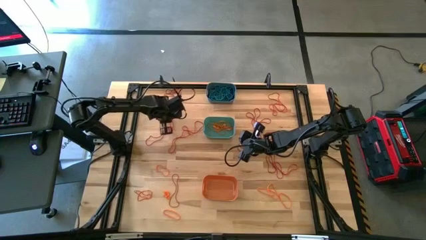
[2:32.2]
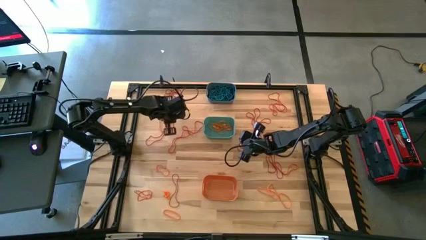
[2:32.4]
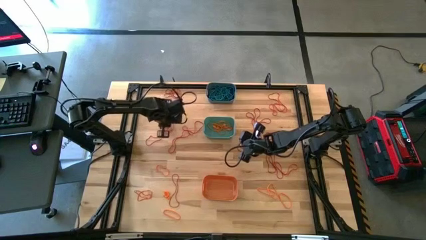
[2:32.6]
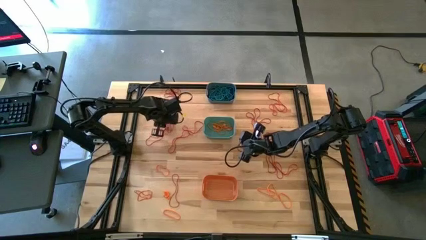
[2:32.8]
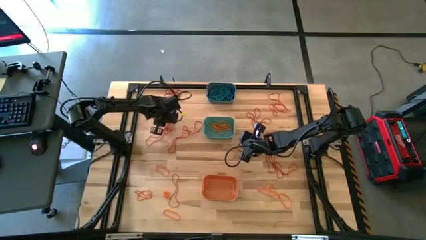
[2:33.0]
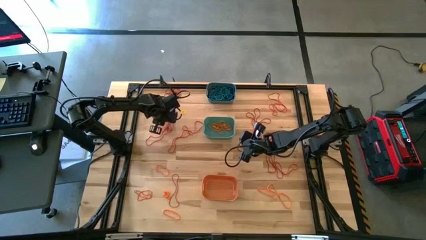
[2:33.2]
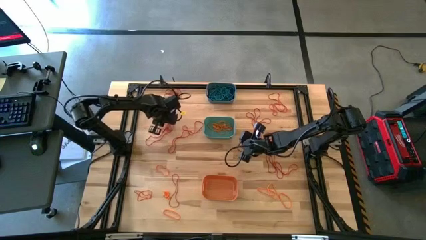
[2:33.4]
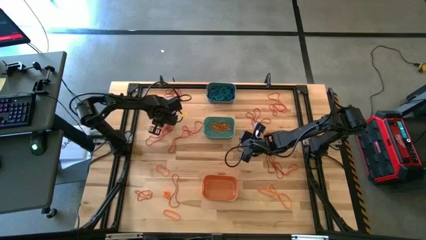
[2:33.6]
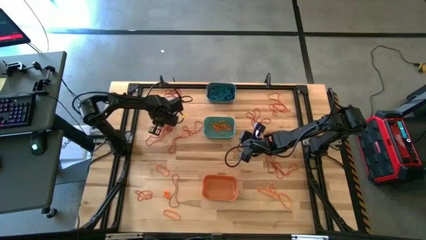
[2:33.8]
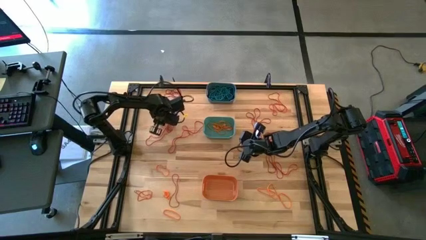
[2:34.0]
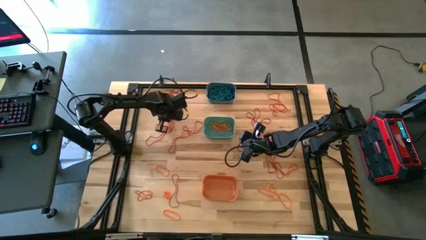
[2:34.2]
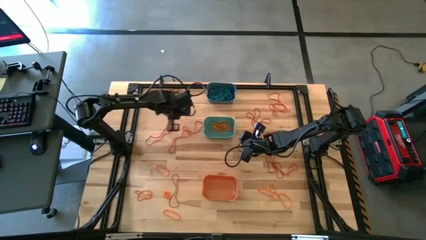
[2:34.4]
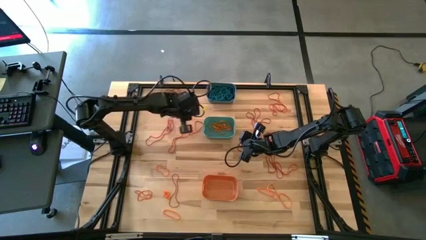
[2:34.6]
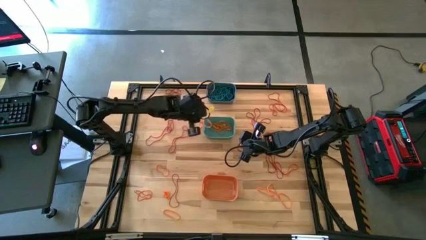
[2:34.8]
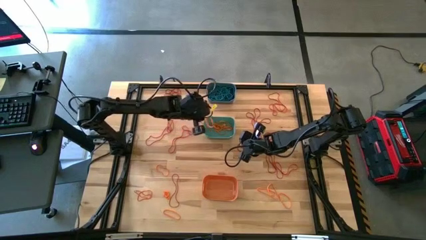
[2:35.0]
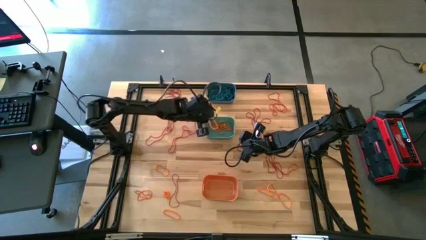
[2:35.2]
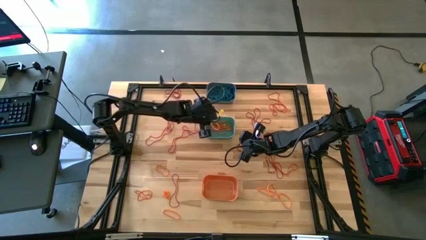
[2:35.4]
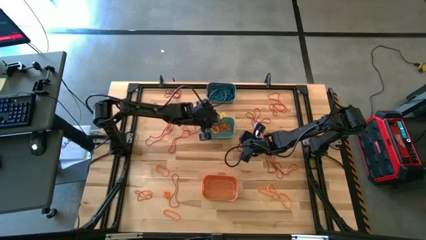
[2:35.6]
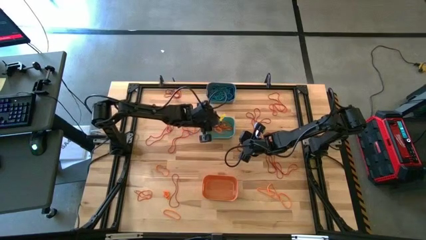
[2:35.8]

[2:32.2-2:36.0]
Task: Sort rubber bands into baskets
Put the orange rubber band into the green bin

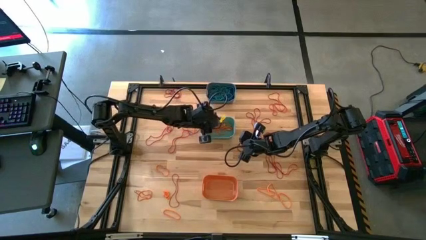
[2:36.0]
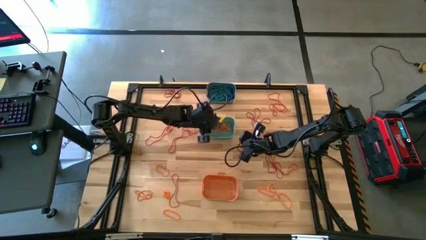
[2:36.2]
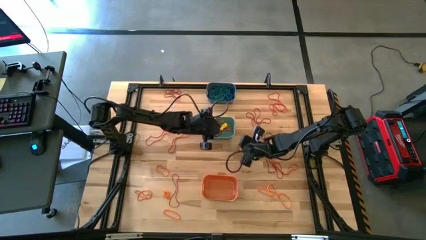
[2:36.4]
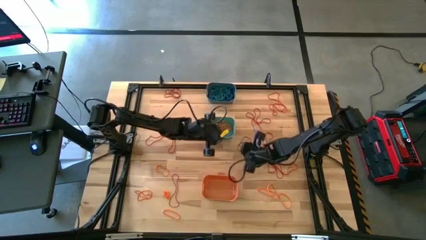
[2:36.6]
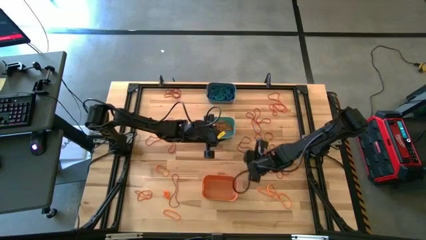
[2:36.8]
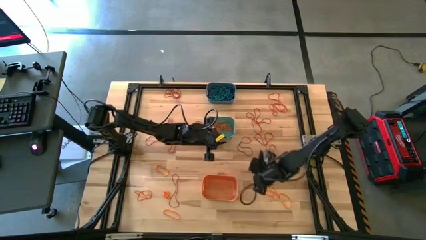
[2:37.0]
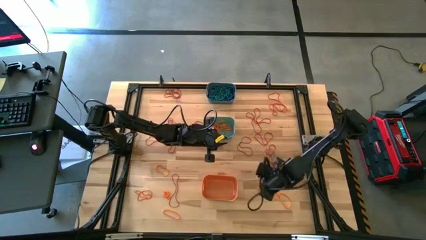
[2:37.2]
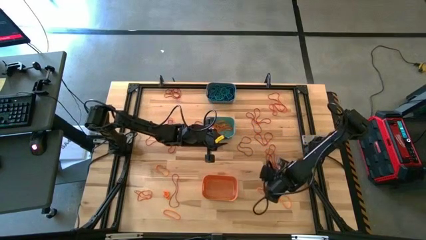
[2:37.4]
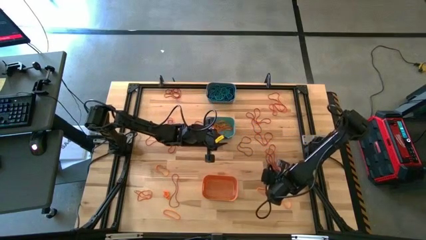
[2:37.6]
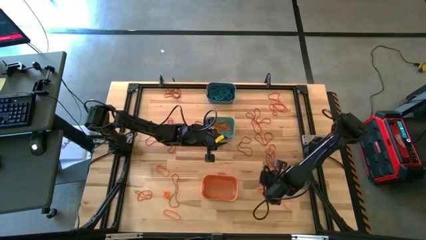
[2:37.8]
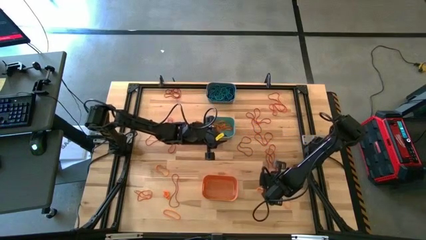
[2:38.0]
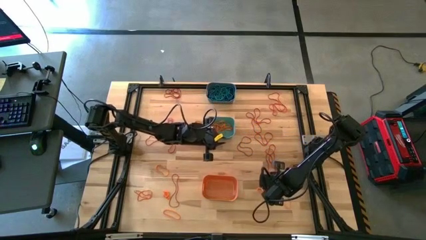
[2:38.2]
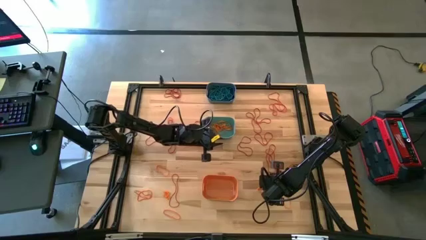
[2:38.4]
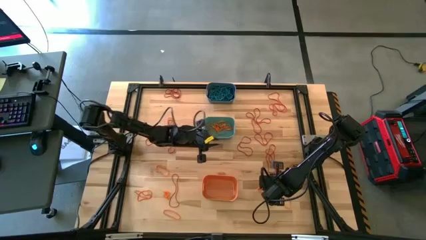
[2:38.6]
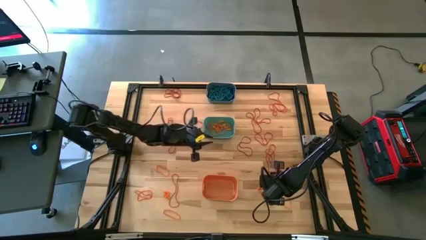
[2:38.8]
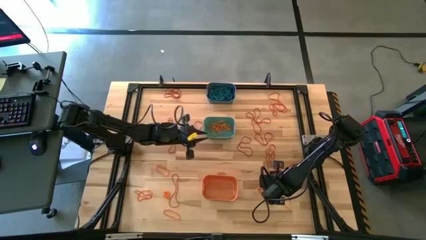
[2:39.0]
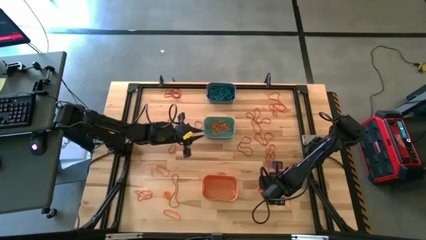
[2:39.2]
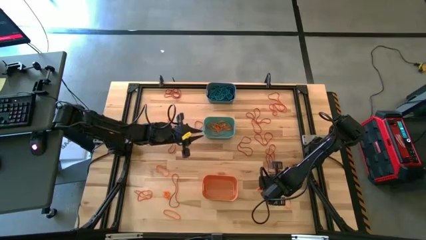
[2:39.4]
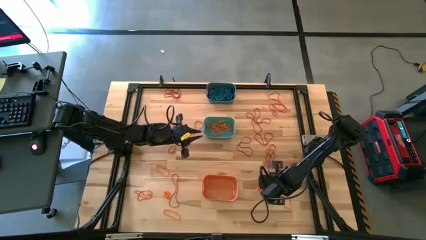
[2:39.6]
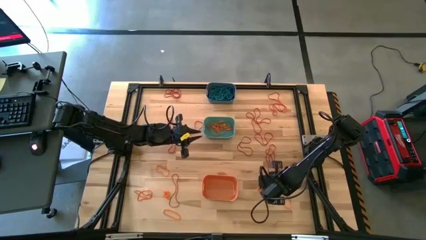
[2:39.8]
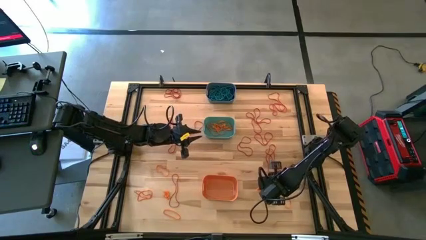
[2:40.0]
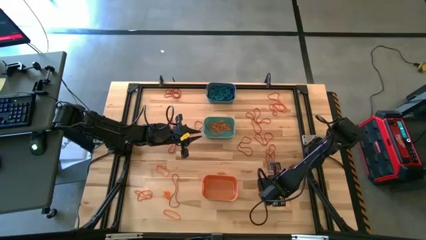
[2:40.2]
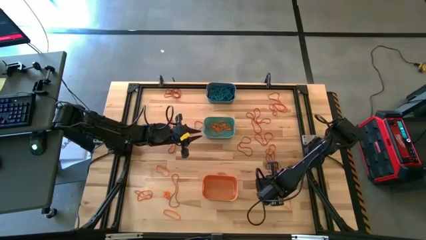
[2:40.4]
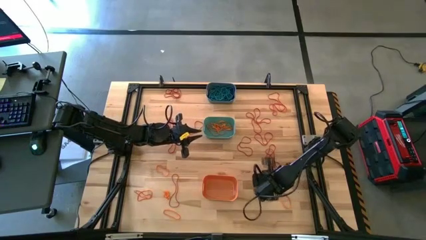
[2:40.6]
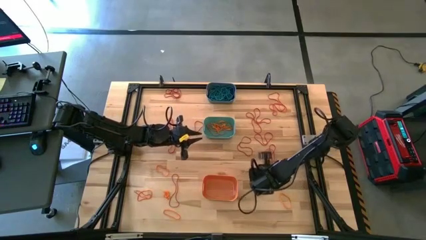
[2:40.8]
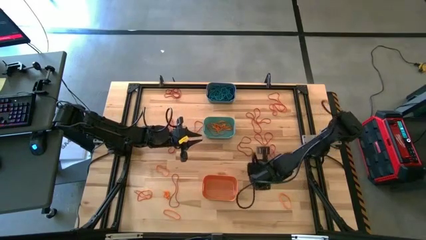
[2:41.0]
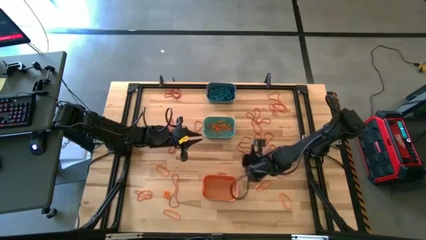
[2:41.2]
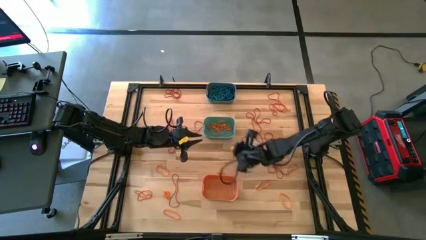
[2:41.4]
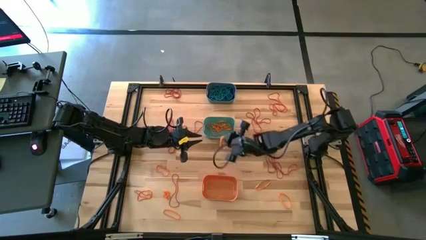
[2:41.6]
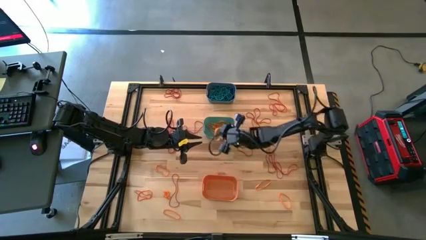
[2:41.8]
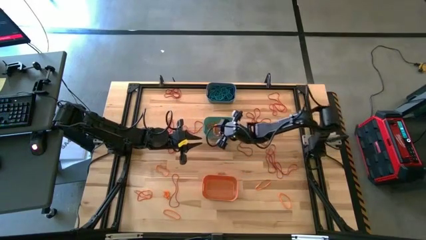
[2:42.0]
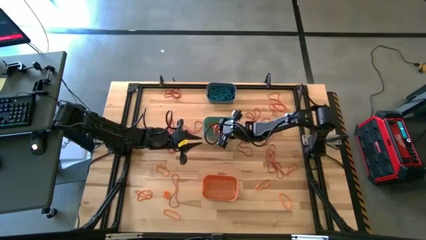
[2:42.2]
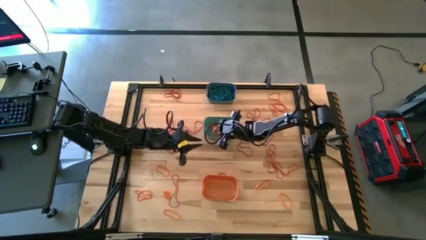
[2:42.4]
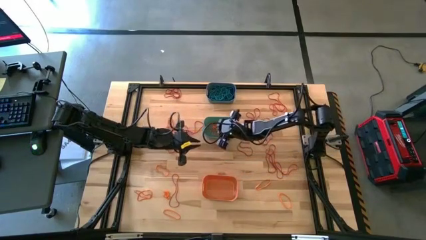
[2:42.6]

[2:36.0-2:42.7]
Put the orange rubber band into the green bin

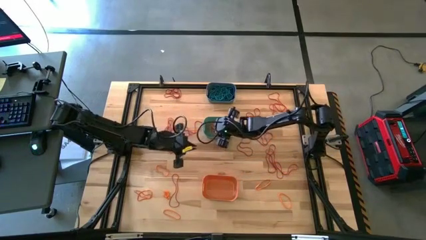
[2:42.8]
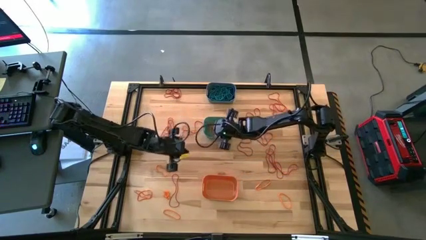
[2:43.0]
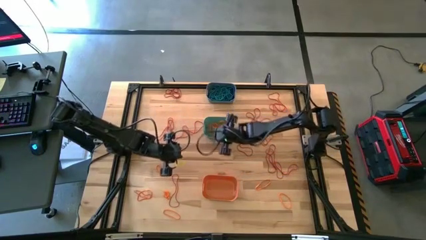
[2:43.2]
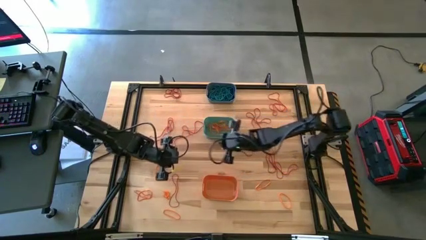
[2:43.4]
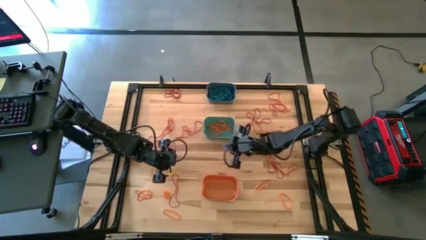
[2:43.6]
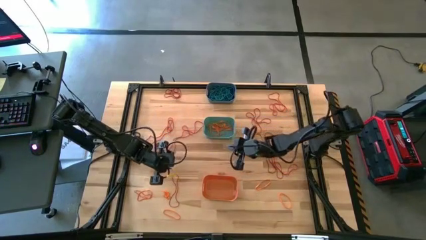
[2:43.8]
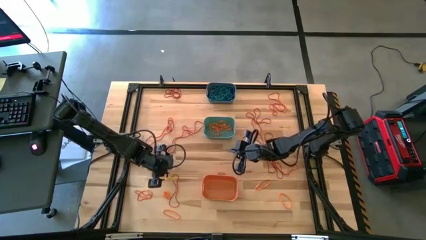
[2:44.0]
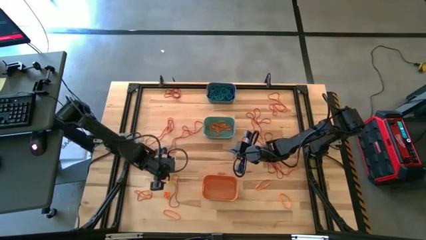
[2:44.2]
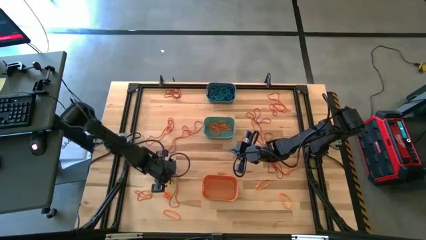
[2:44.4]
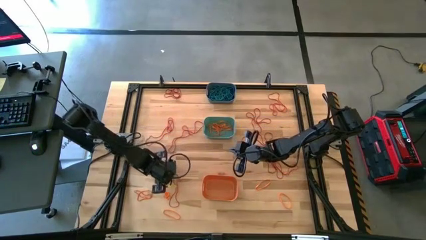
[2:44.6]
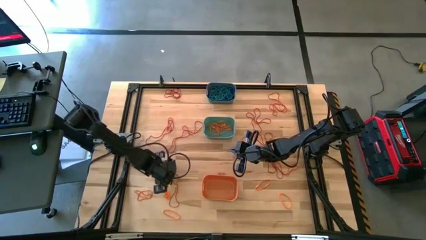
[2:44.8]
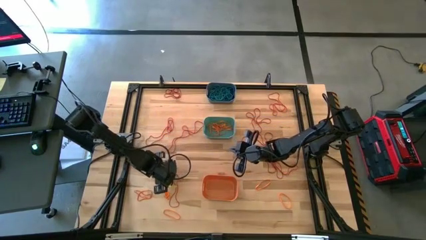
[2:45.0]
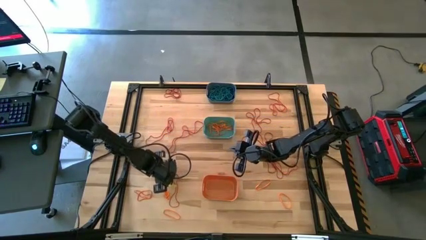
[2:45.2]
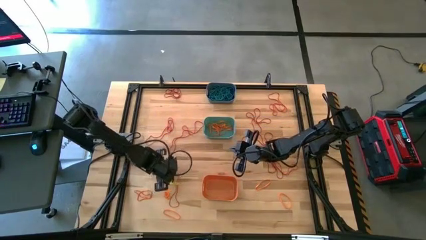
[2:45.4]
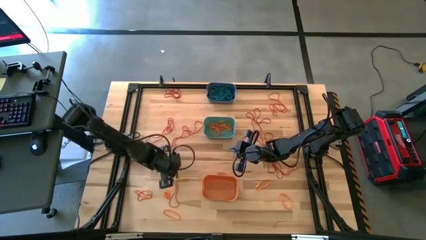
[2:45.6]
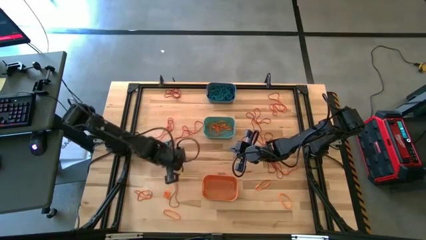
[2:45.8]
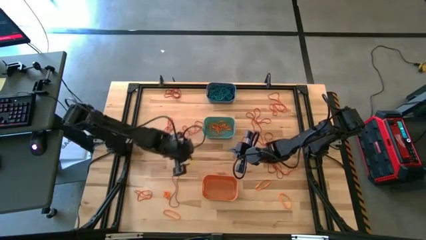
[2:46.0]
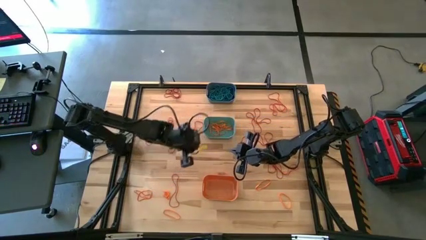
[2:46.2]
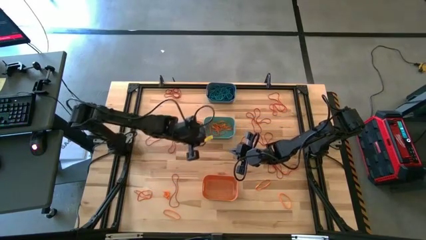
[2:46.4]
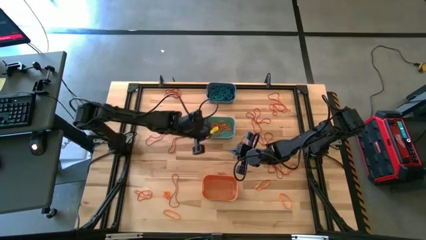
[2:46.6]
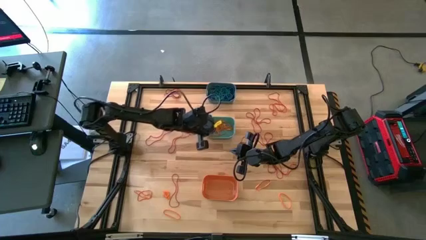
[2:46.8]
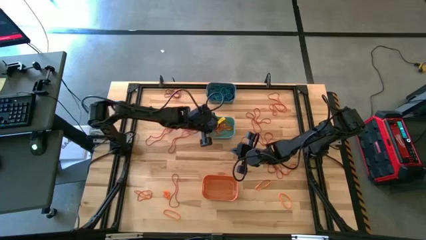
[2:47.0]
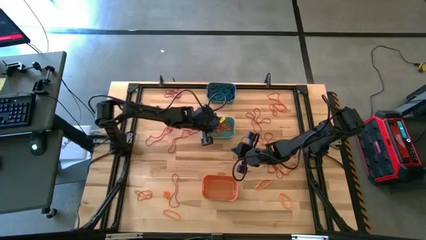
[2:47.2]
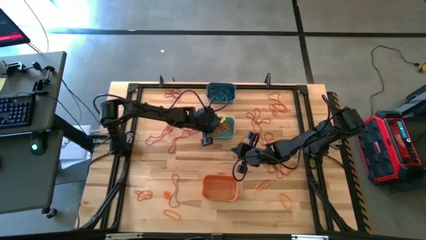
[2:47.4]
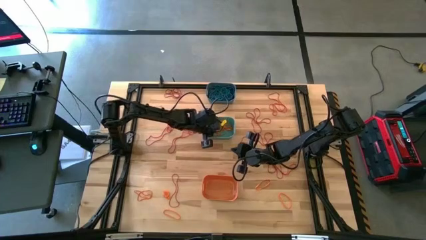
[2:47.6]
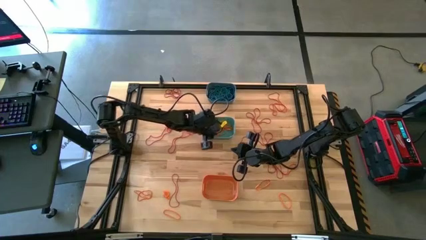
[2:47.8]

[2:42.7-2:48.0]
Put the orange rubber band into the green bin
